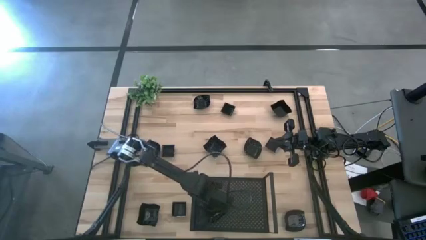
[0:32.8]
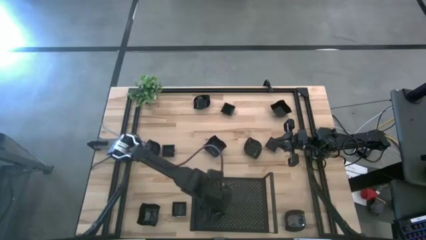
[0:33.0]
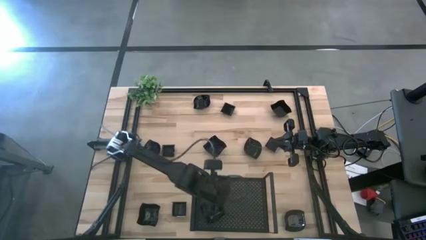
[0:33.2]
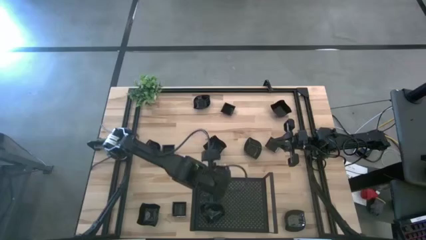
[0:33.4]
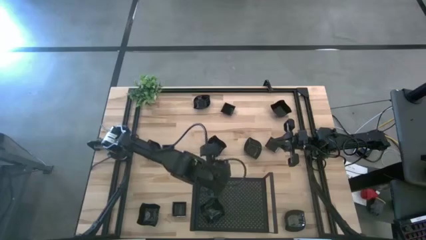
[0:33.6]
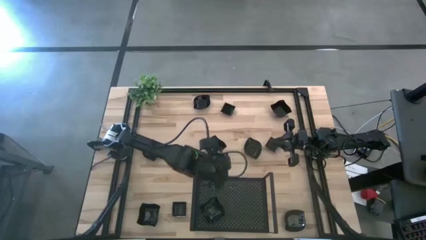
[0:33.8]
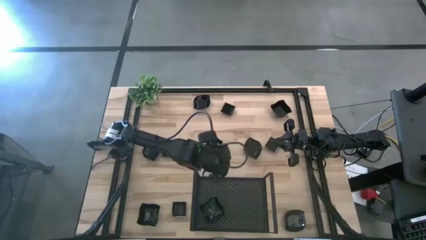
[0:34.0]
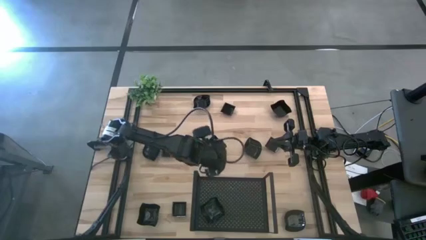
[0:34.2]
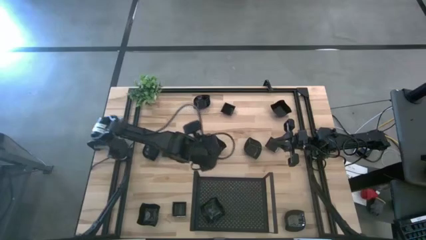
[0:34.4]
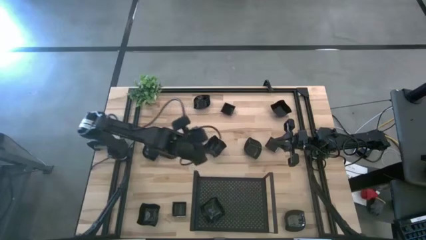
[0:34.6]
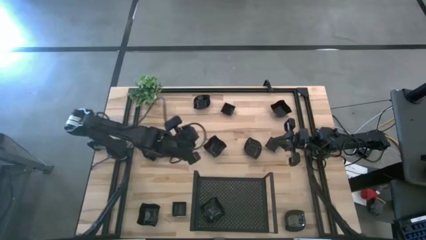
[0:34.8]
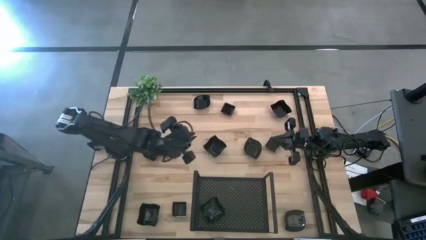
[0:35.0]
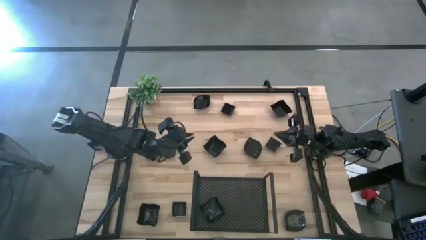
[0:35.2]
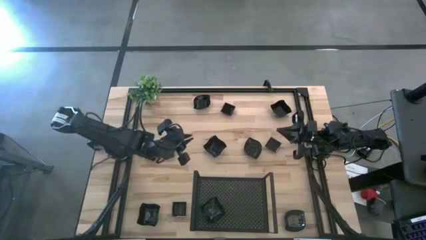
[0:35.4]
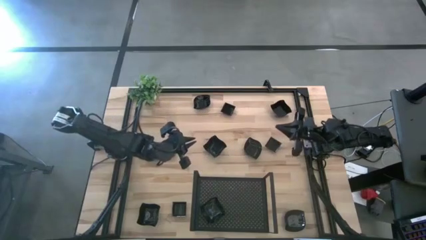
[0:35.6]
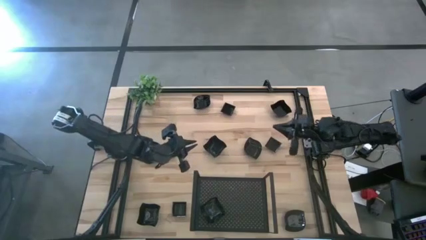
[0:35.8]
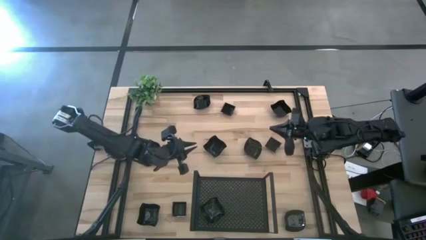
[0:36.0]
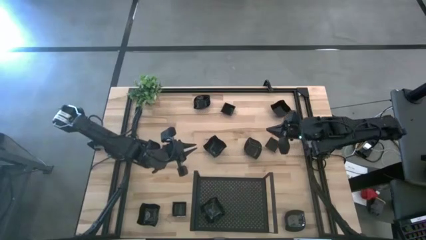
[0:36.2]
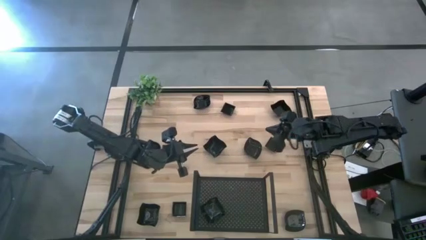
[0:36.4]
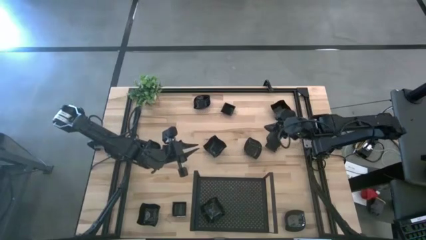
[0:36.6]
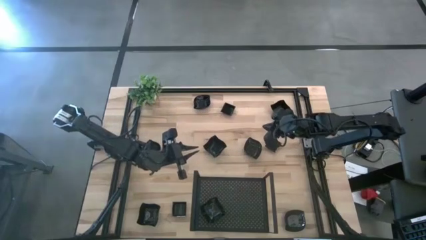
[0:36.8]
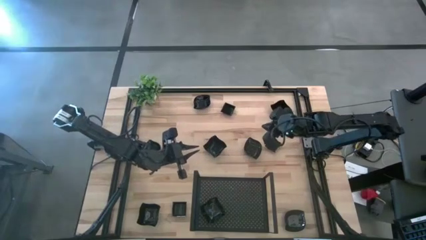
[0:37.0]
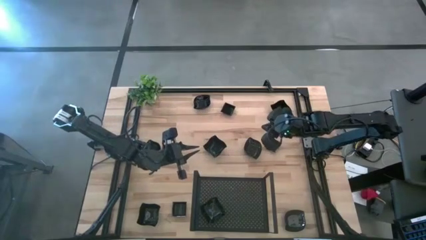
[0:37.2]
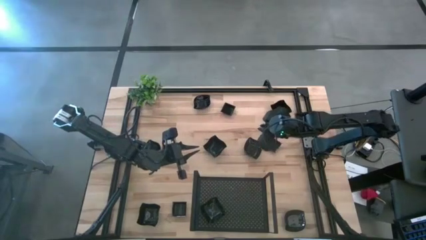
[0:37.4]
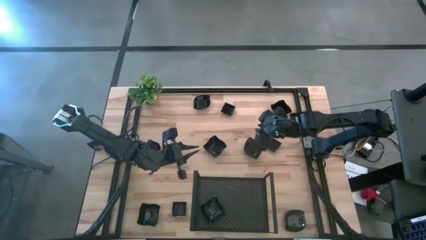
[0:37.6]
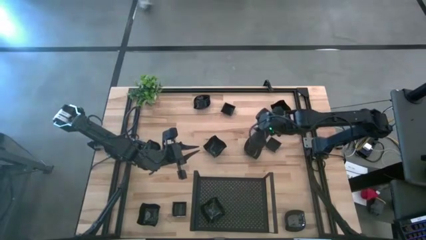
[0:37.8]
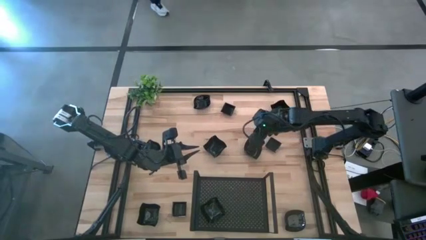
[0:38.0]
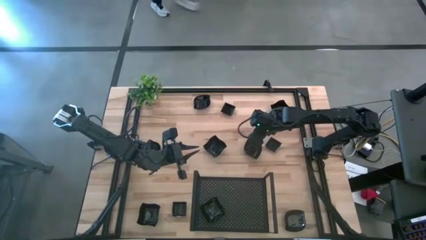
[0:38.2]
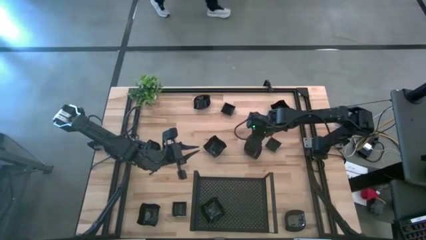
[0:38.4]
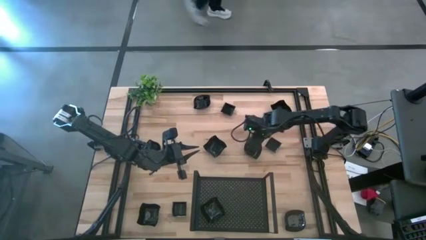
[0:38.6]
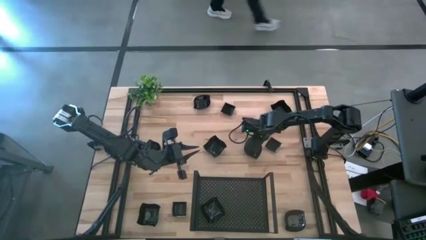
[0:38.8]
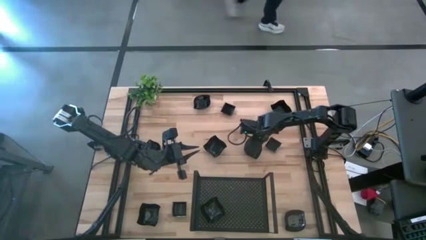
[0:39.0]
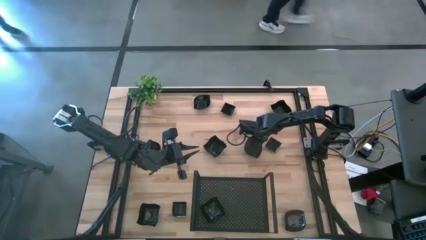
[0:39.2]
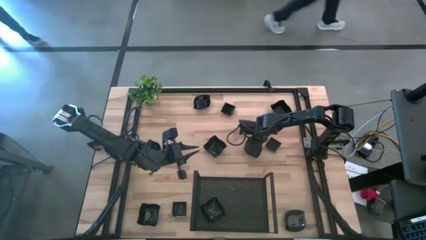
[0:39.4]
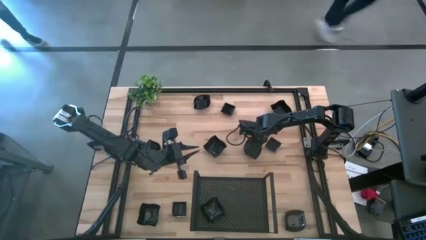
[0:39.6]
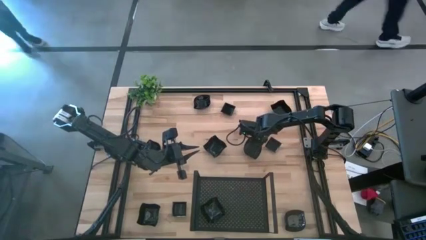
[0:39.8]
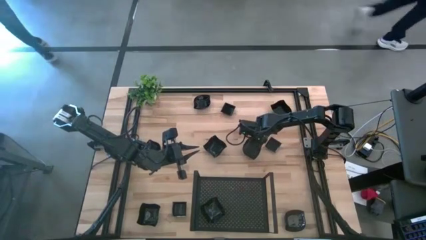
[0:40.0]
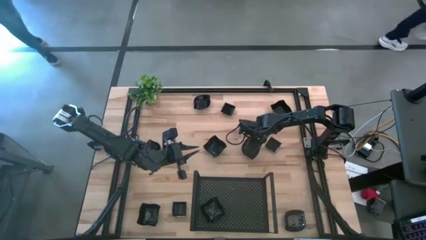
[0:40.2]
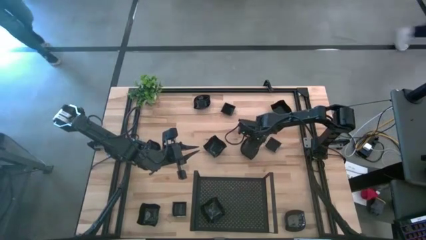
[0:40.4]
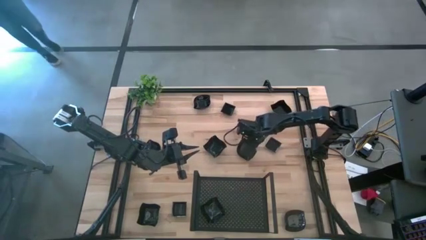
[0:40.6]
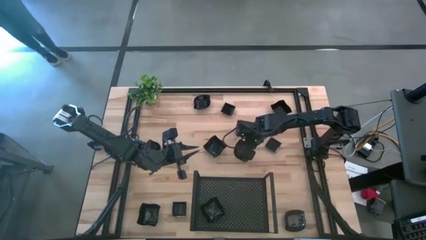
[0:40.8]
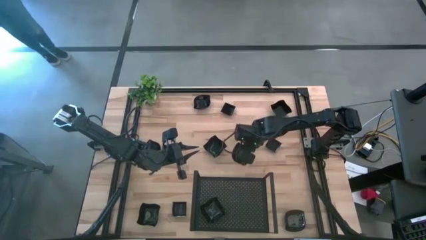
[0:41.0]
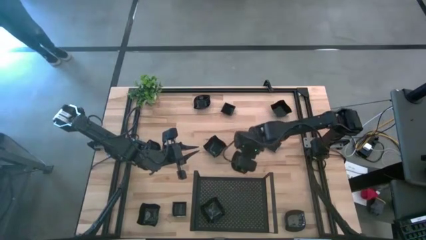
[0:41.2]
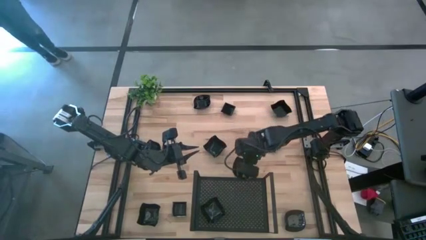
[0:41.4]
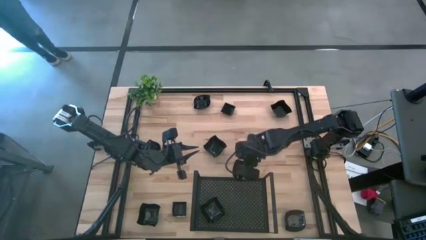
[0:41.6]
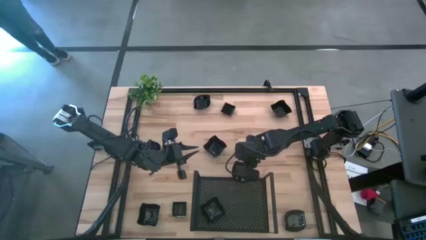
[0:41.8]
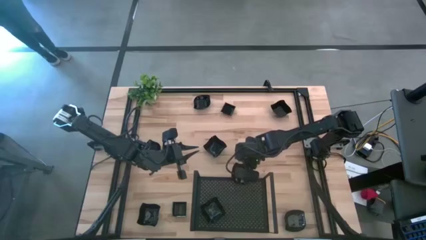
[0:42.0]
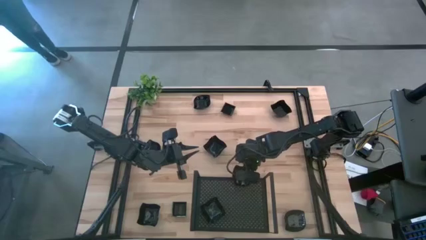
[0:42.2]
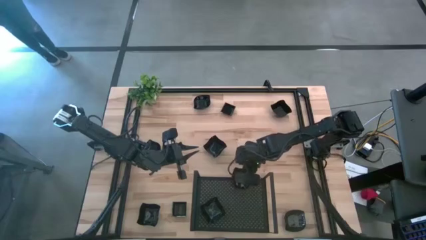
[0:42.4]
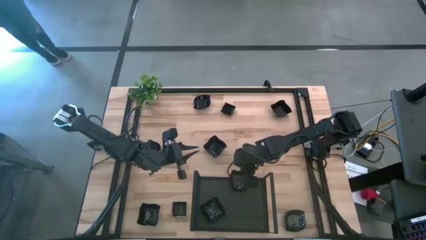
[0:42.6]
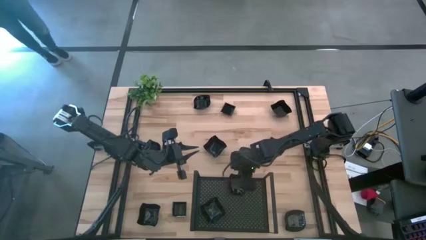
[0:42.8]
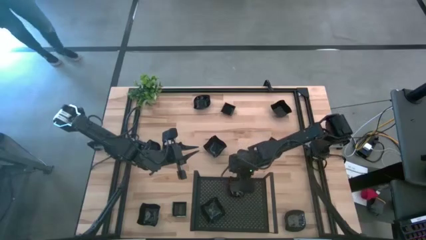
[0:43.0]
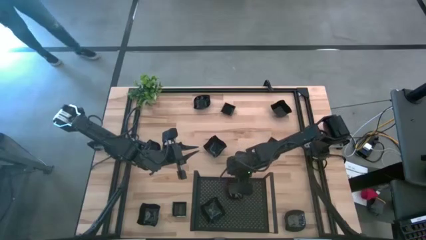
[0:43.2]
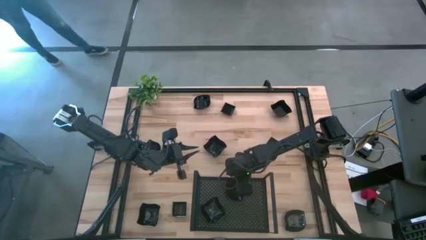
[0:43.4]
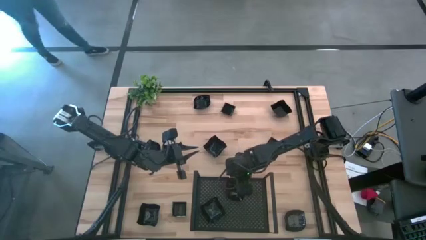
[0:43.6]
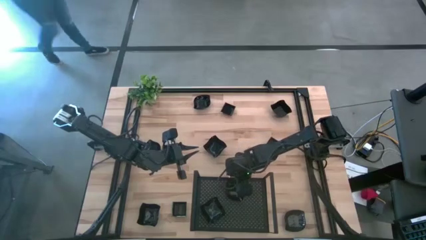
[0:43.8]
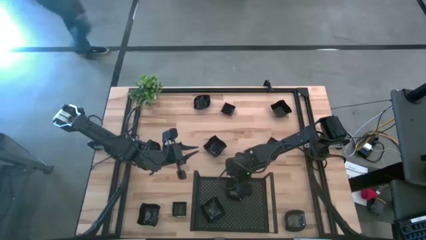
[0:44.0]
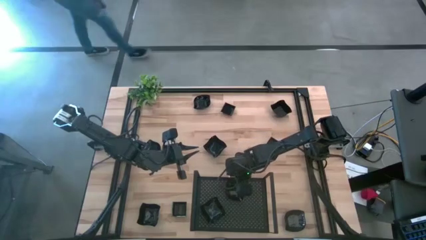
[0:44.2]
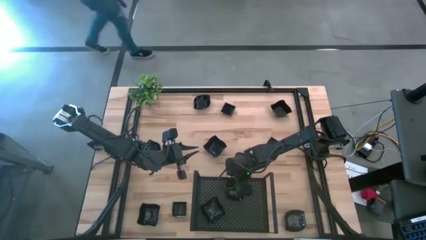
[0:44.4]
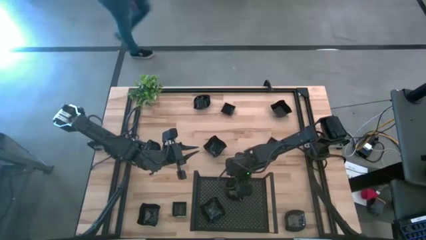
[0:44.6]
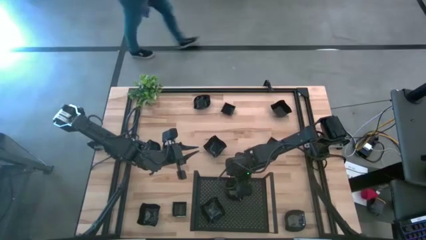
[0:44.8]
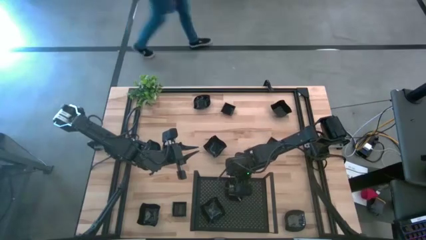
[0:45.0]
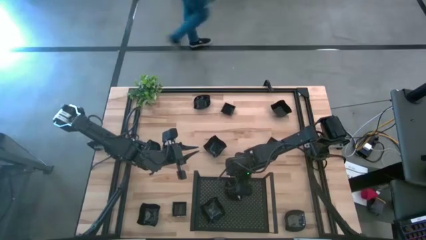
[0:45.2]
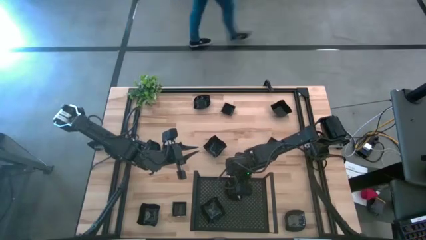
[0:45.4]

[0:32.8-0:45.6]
Task: Pick & Place Mini shaped plates
Put the leaf-shaped bowl on the shelf
